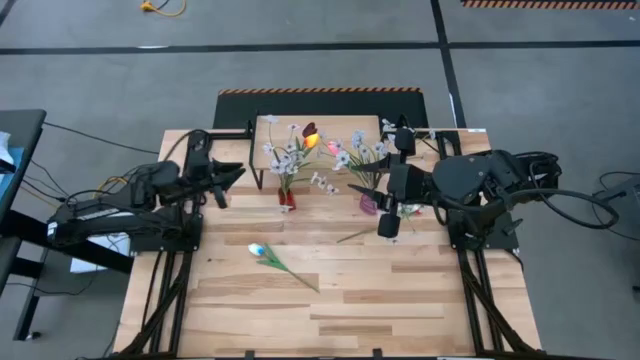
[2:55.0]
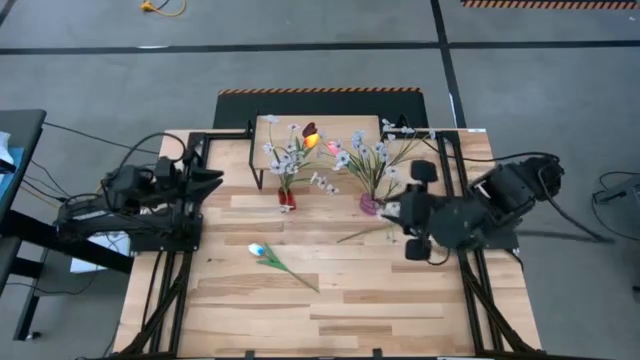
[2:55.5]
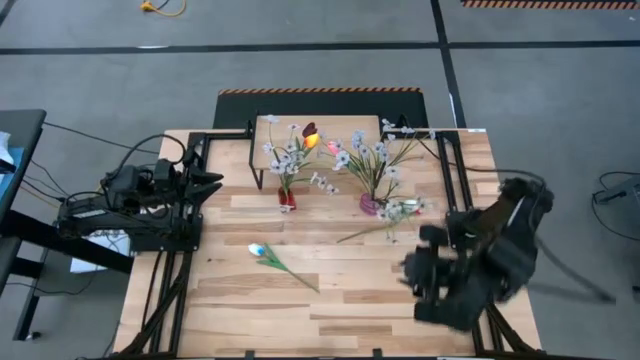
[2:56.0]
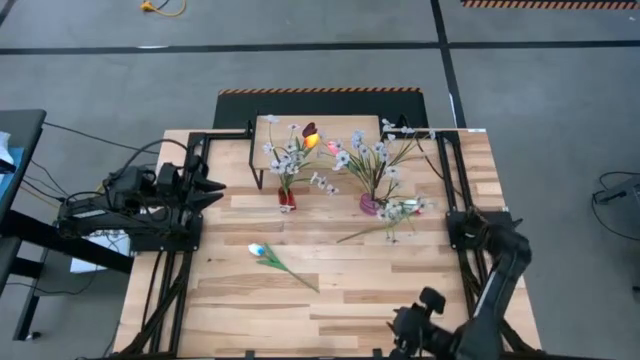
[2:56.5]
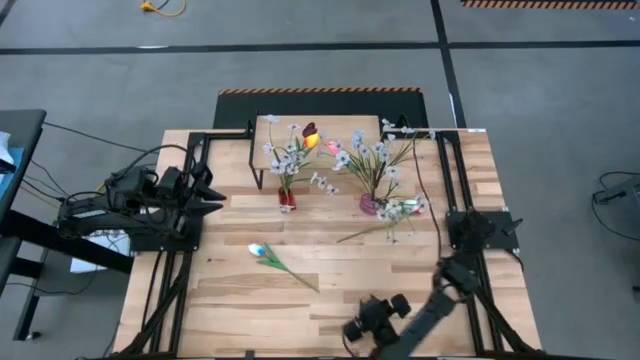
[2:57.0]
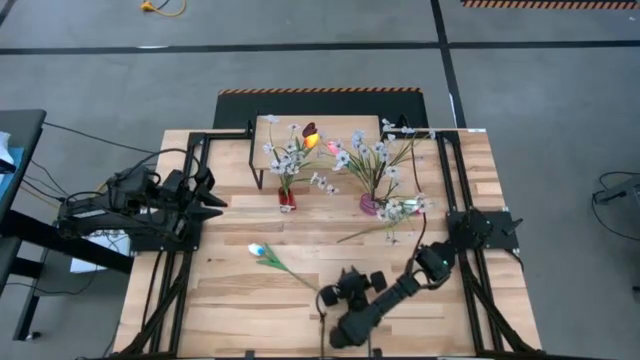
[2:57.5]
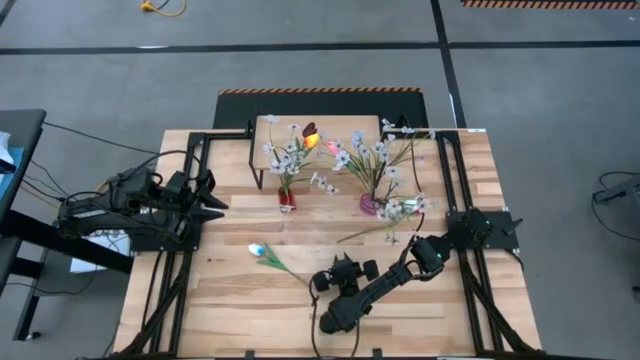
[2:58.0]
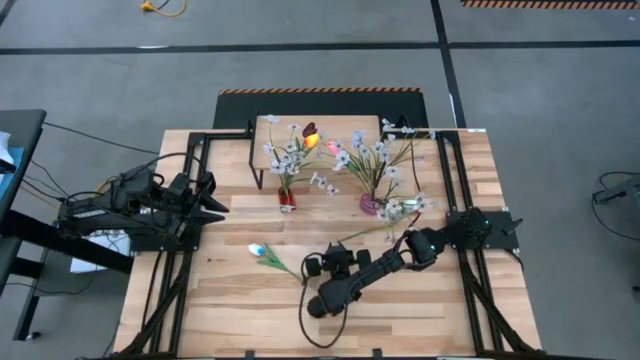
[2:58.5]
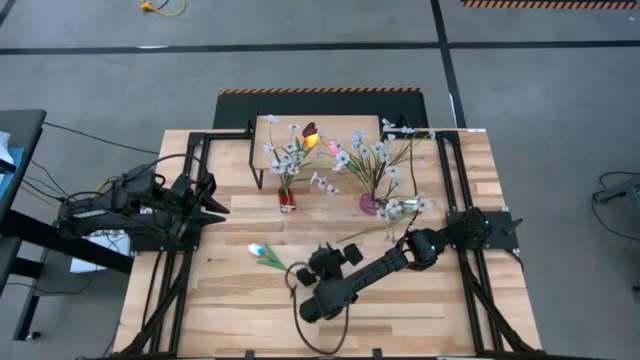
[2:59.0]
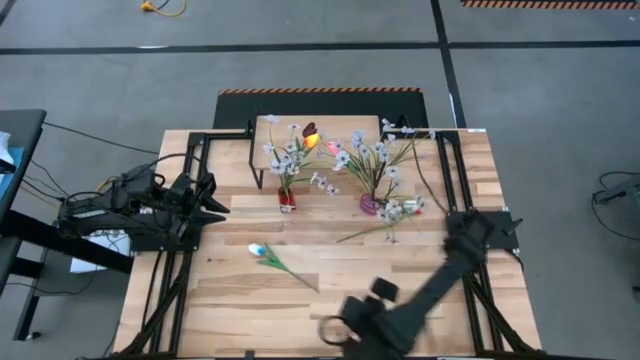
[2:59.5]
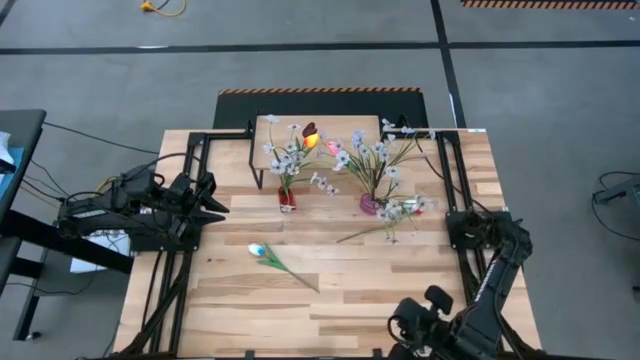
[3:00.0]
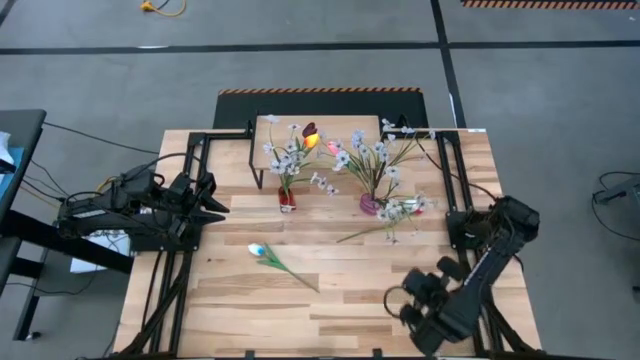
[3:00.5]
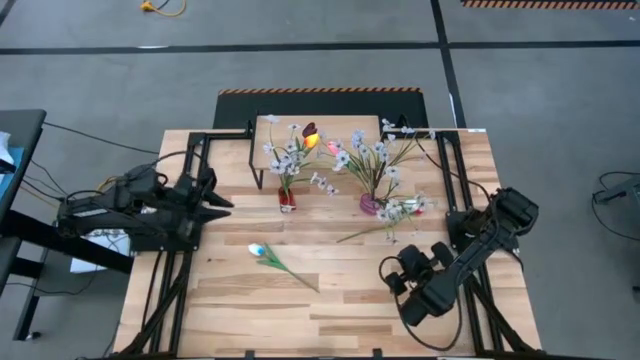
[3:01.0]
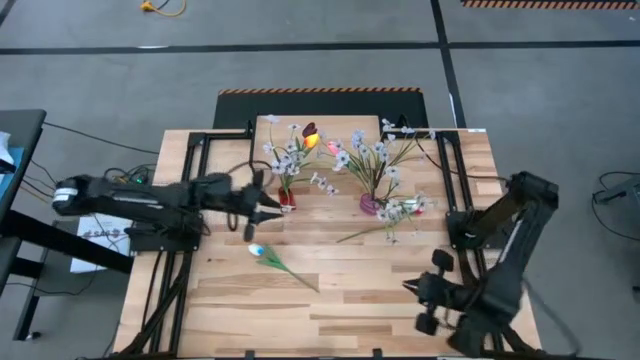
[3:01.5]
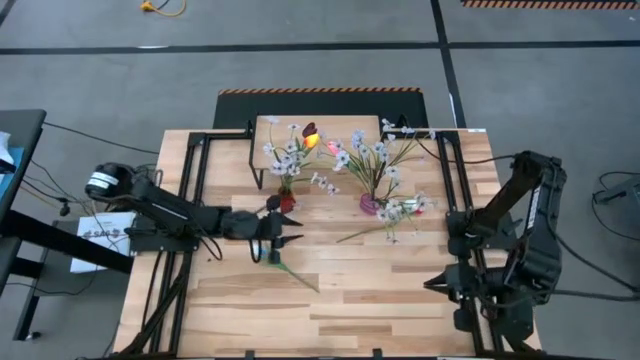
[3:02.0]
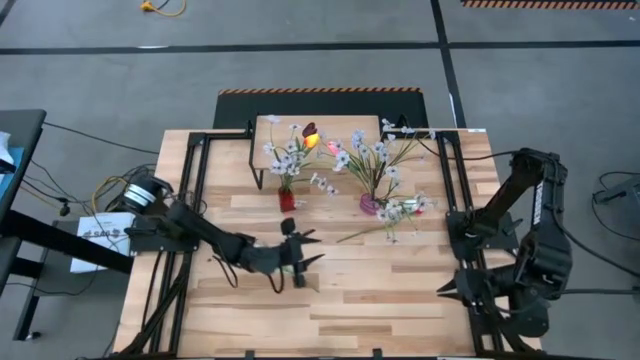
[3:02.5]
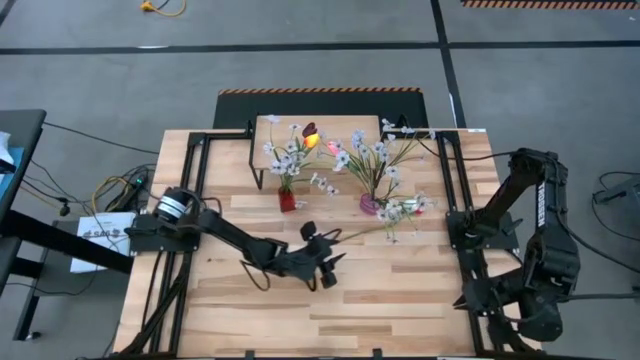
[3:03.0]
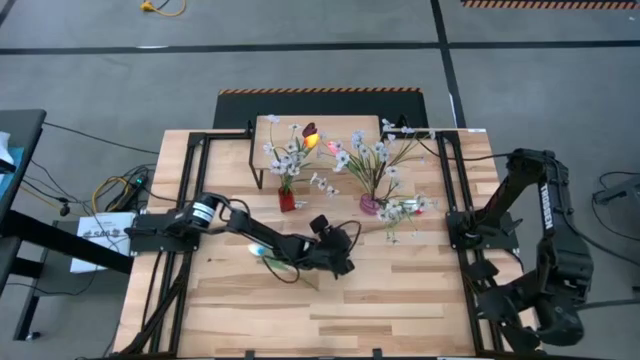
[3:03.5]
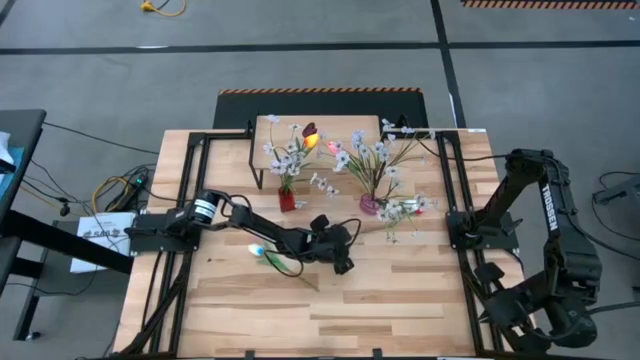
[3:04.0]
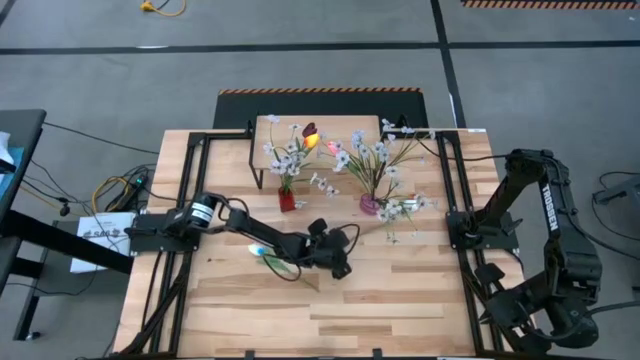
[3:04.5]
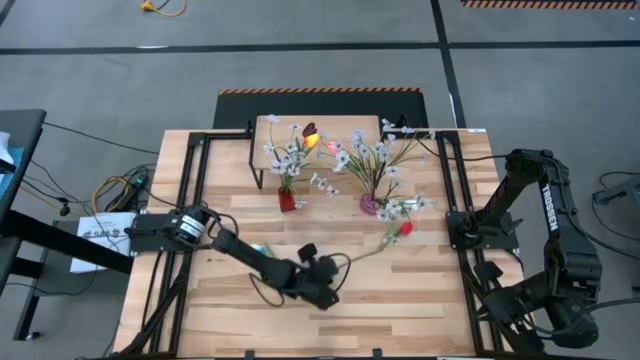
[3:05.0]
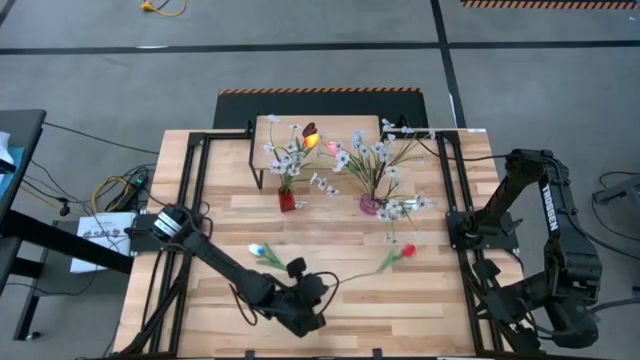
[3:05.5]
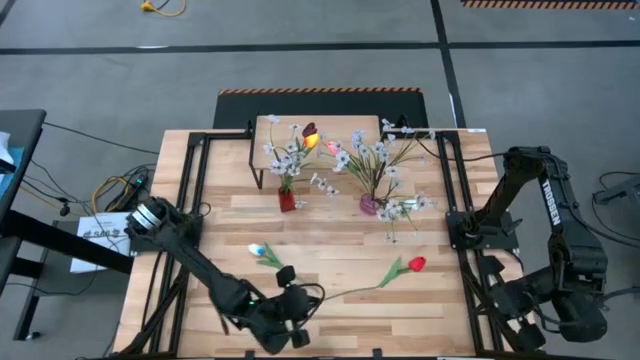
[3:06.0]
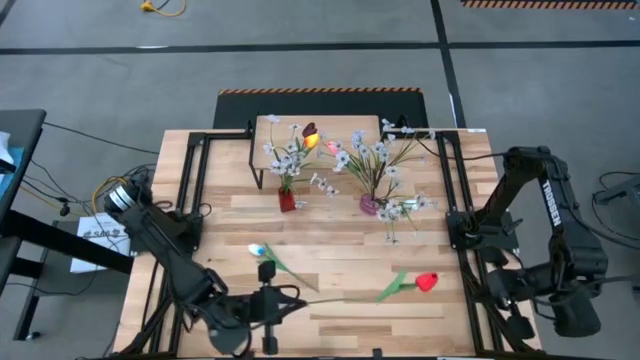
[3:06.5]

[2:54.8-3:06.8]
Task: Pick and place flowers into a vace then onto a shelf
Put the red tulip into the red vase

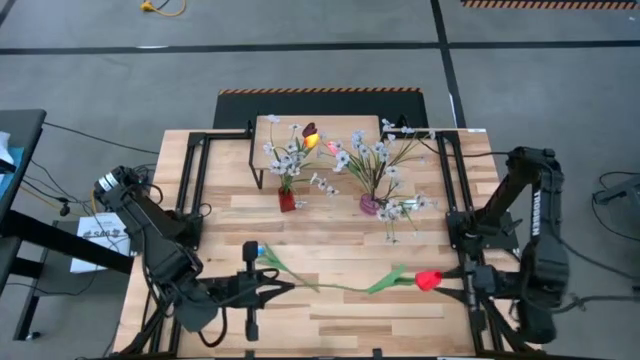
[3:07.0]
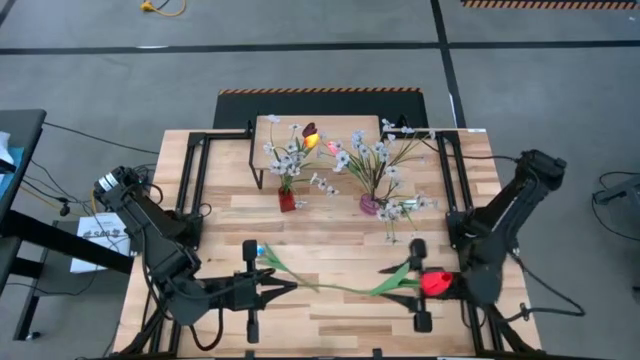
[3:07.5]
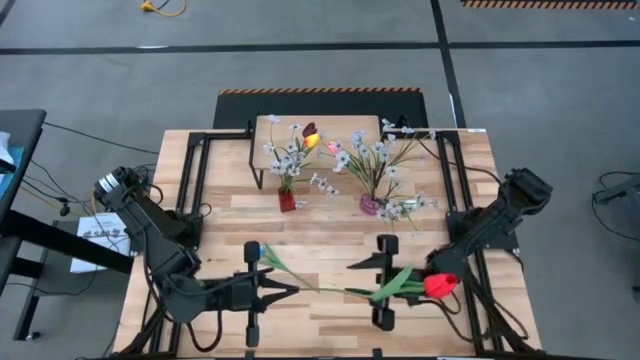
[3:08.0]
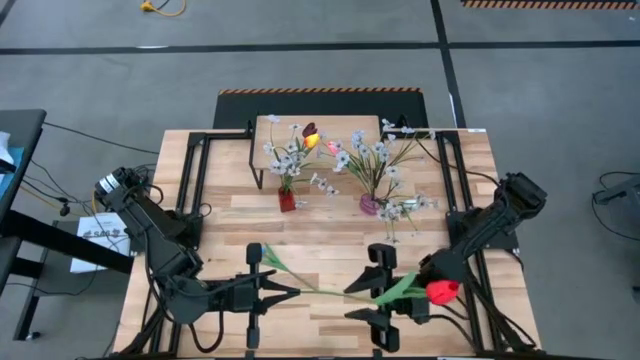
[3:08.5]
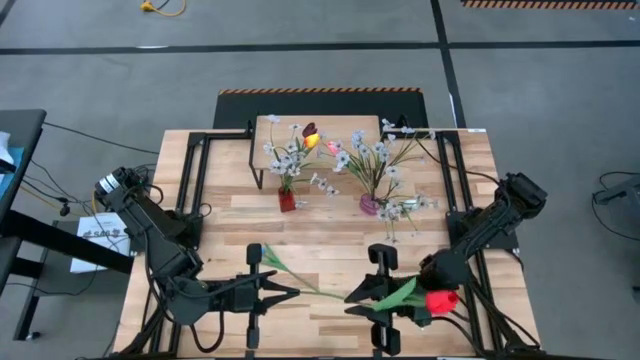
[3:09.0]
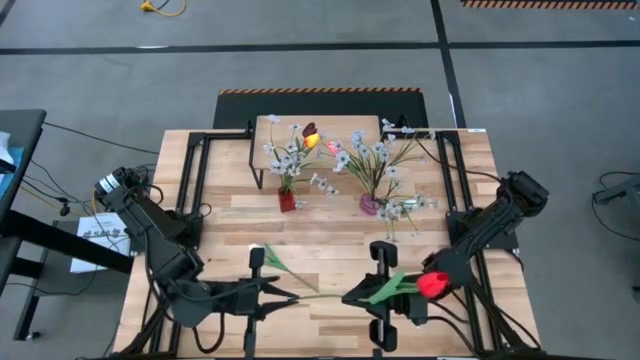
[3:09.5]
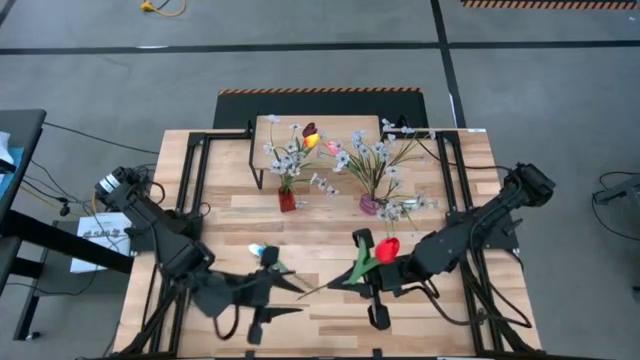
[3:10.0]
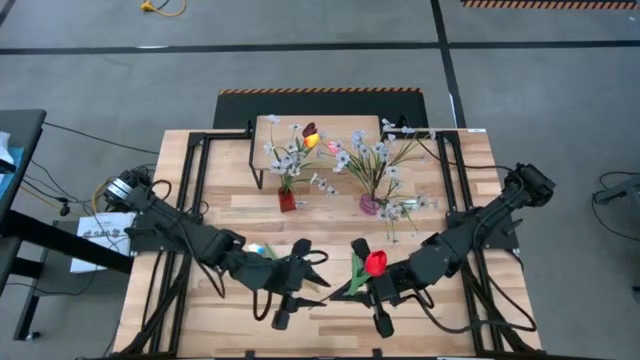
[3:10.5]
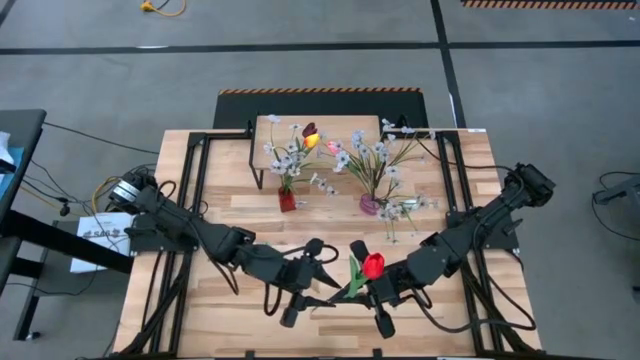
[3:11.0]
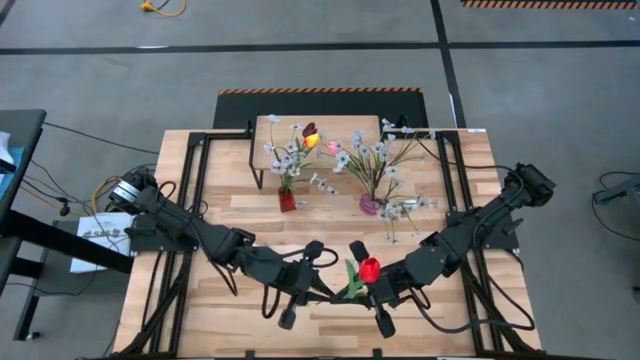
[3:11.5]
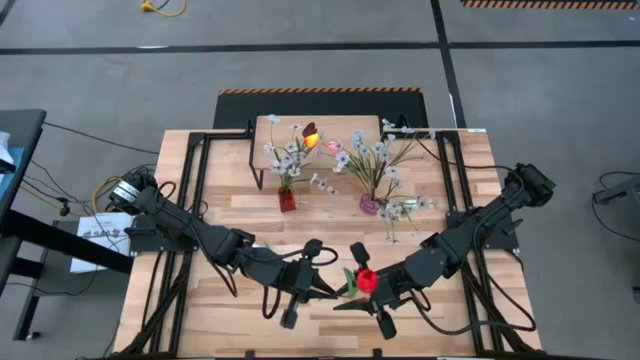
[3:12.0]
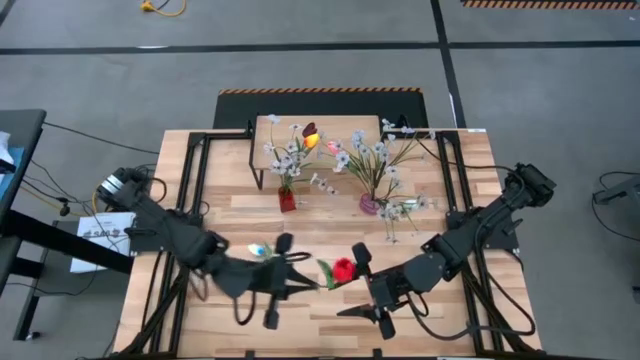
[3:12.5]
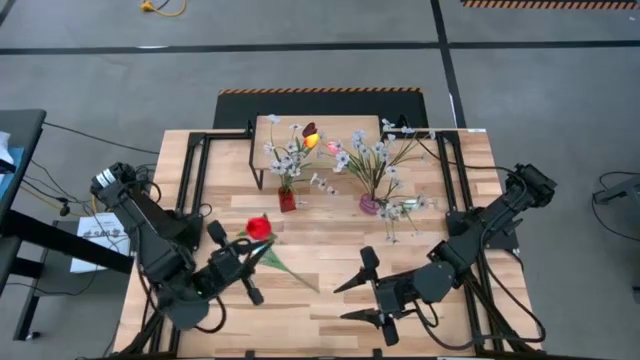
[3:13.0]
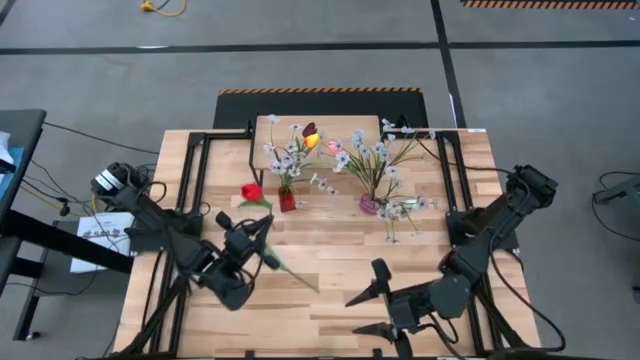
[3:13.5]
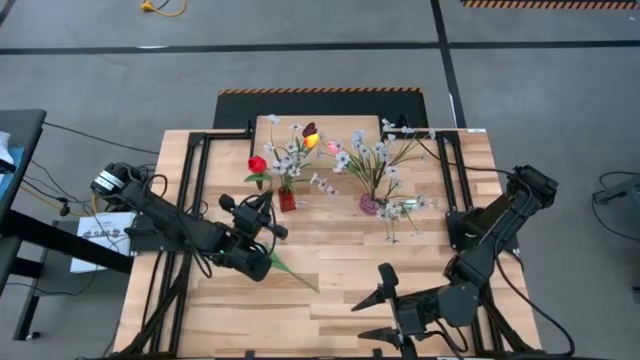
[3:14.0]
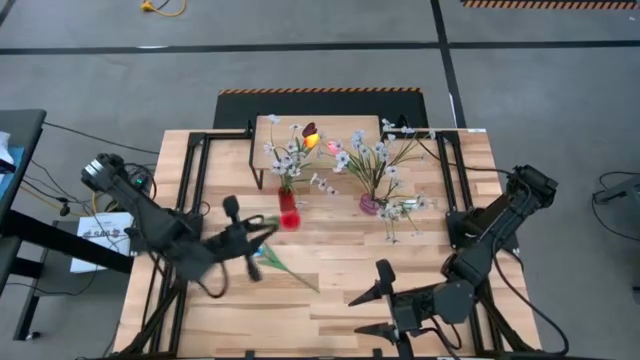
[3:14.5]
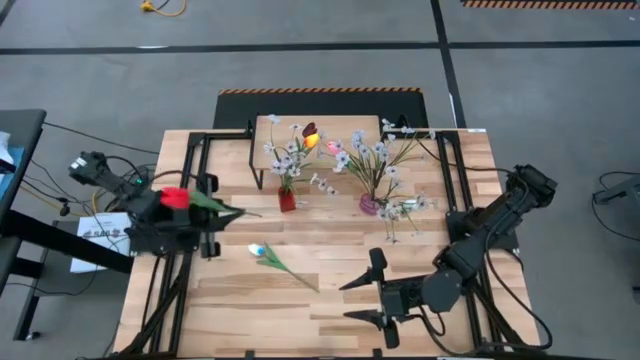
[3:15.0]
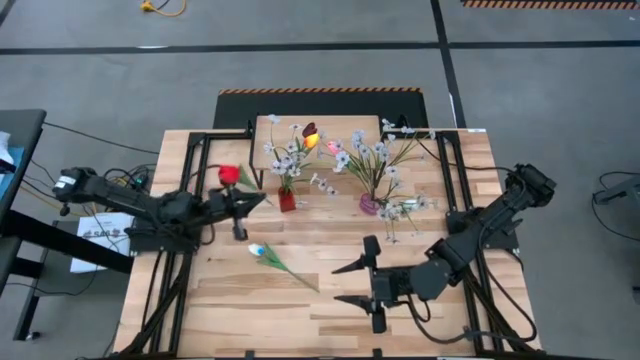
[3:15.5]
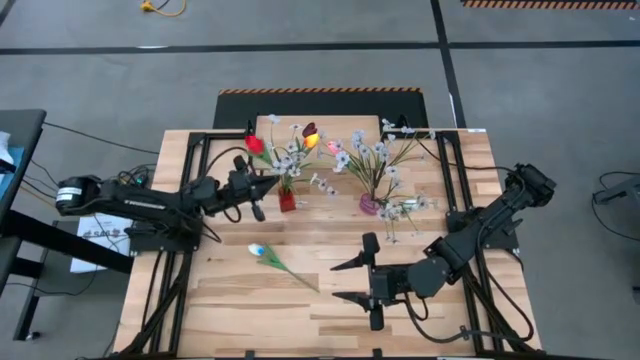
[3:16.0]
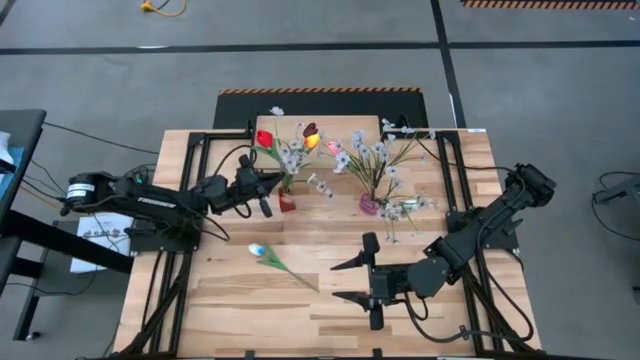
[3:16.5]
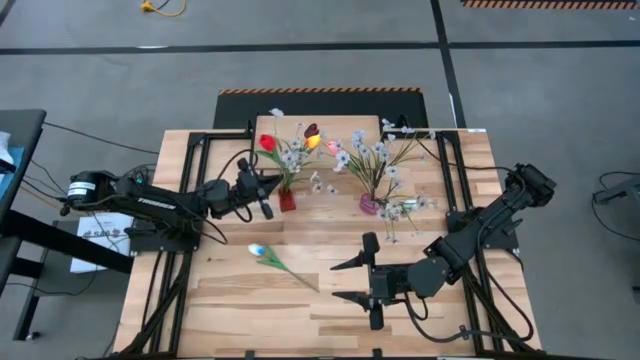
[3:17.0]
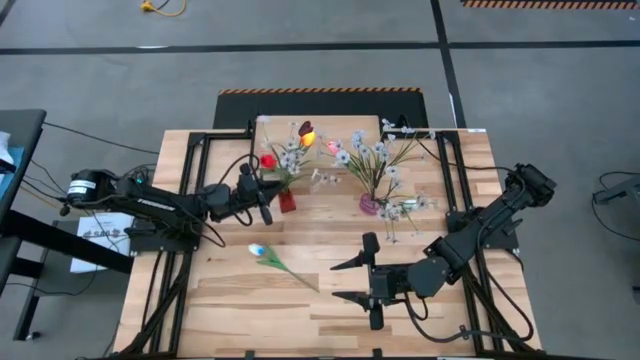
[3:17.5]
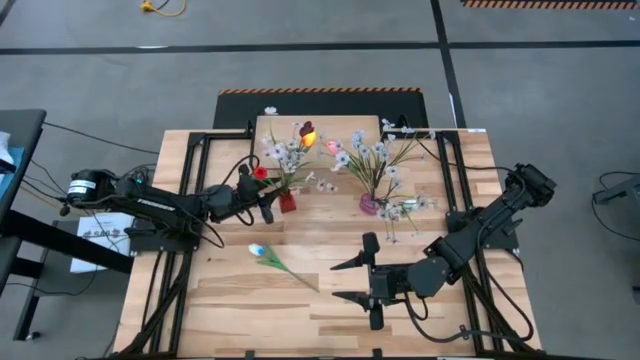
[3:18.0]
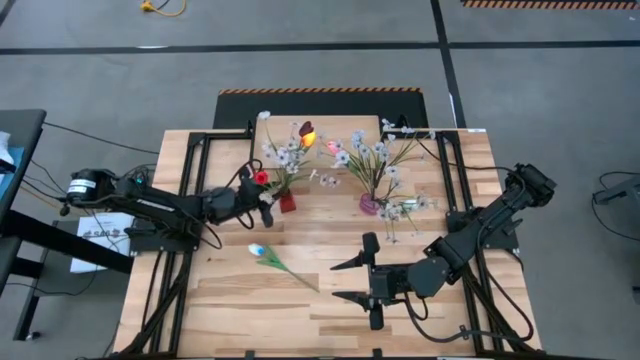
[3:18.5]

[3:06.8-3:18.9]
Put the red tulip into the red vase
